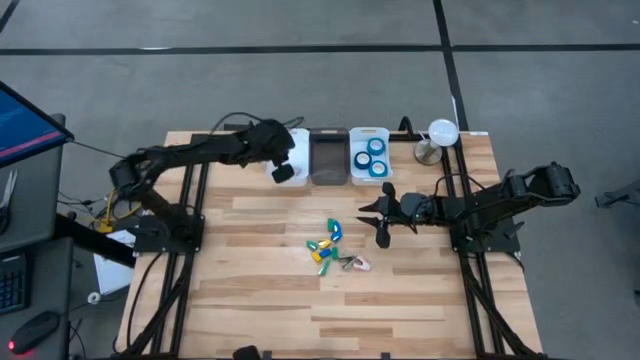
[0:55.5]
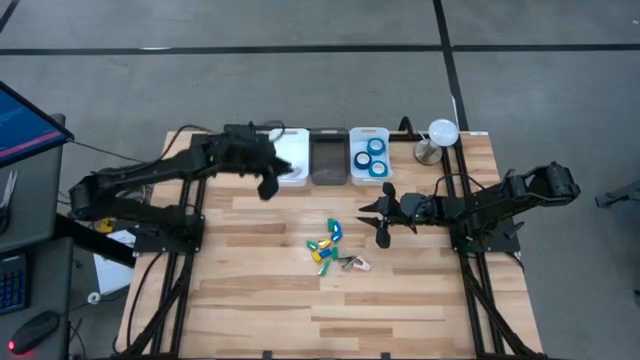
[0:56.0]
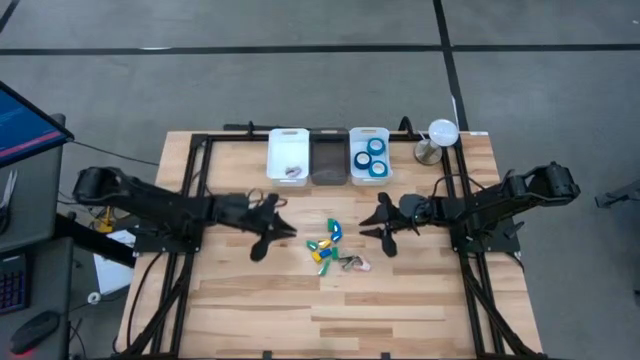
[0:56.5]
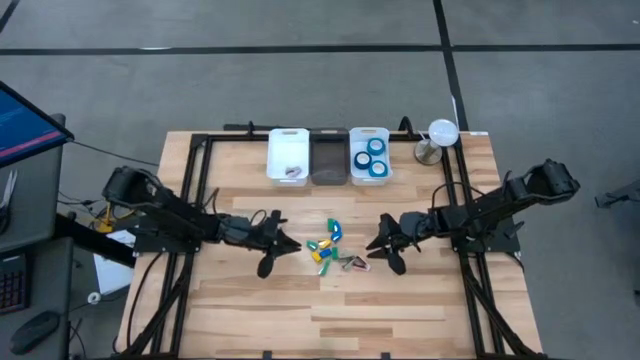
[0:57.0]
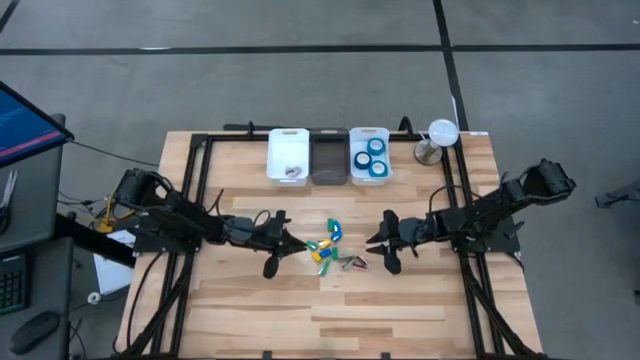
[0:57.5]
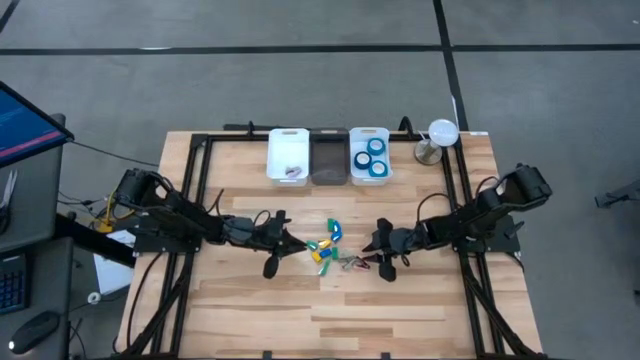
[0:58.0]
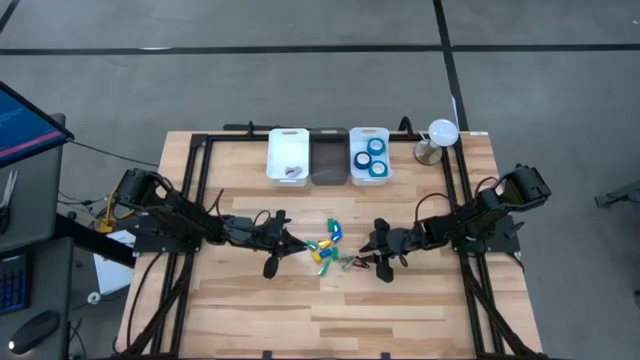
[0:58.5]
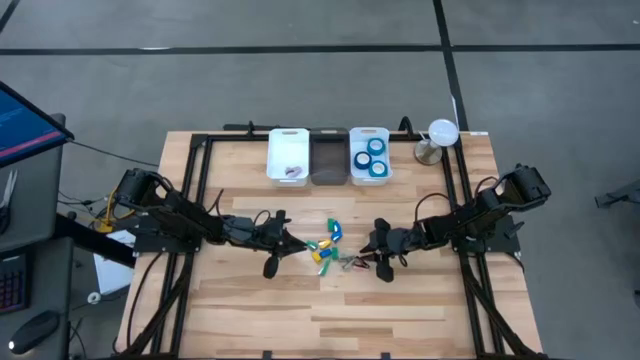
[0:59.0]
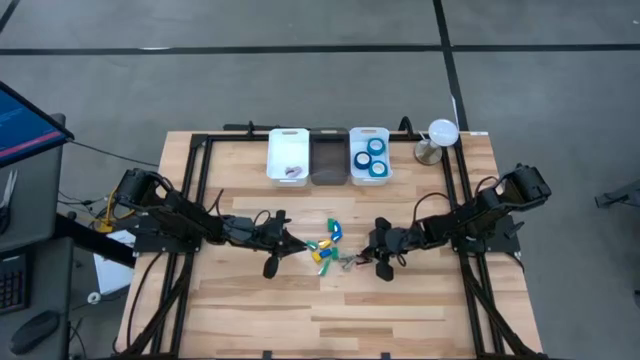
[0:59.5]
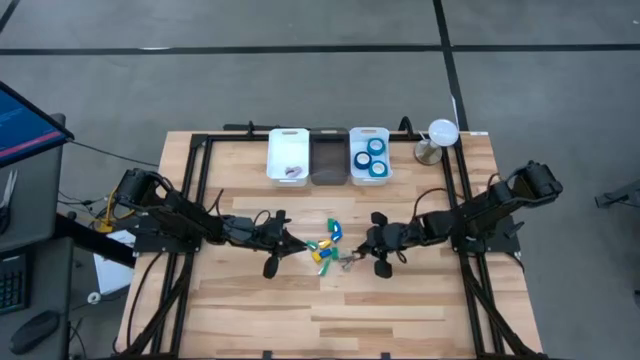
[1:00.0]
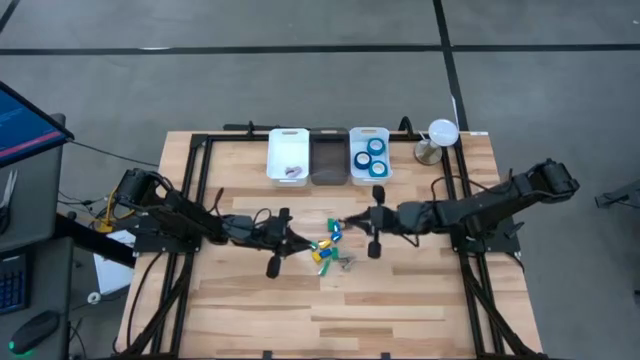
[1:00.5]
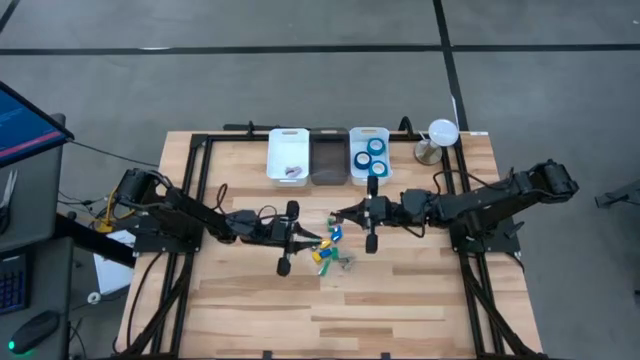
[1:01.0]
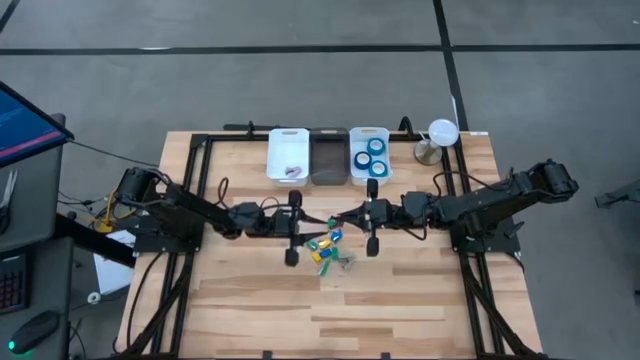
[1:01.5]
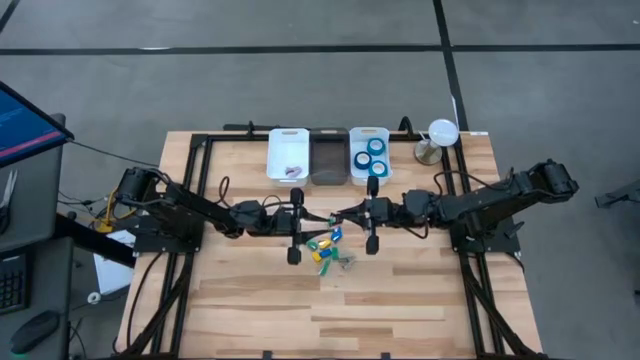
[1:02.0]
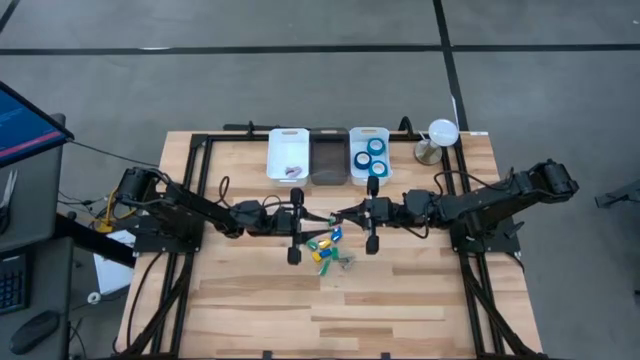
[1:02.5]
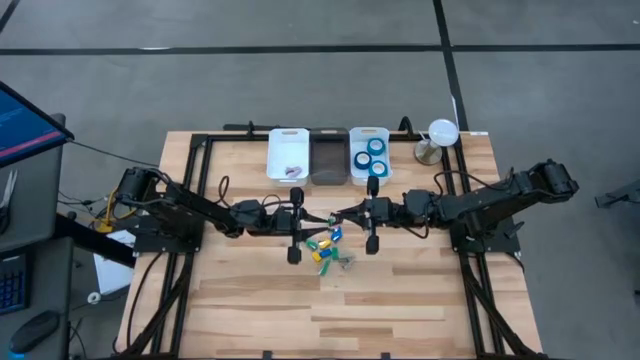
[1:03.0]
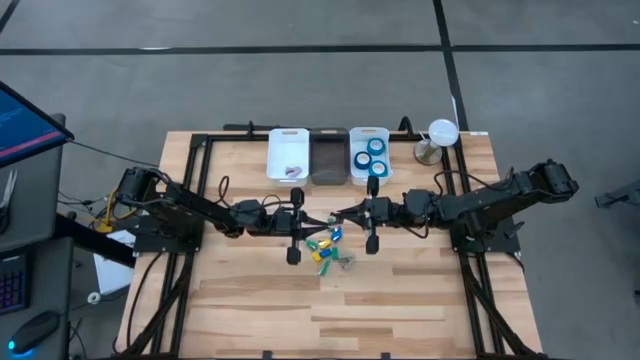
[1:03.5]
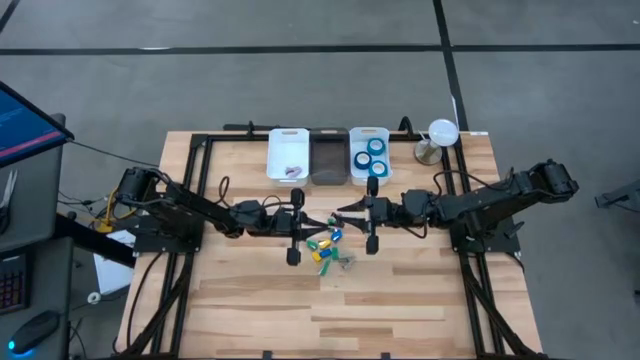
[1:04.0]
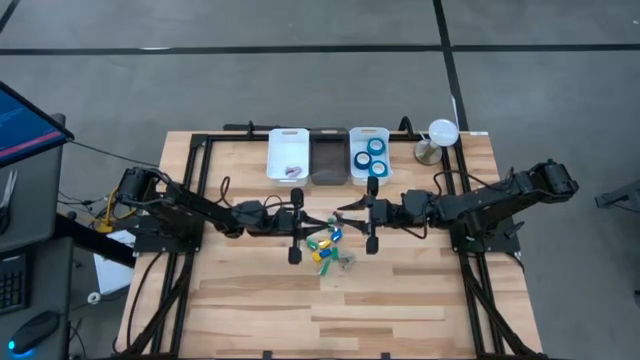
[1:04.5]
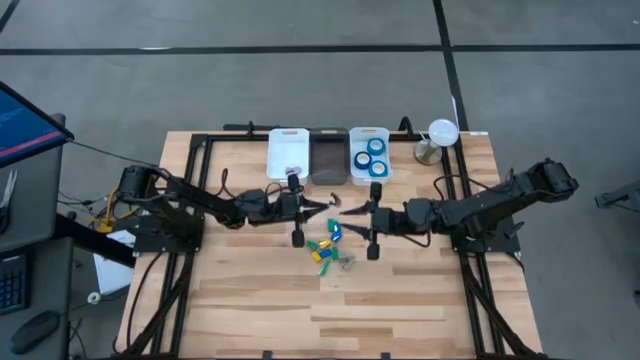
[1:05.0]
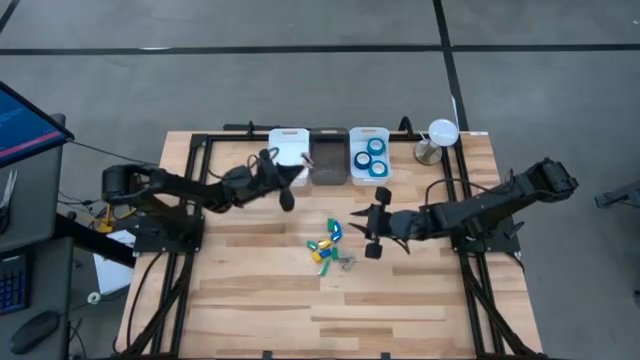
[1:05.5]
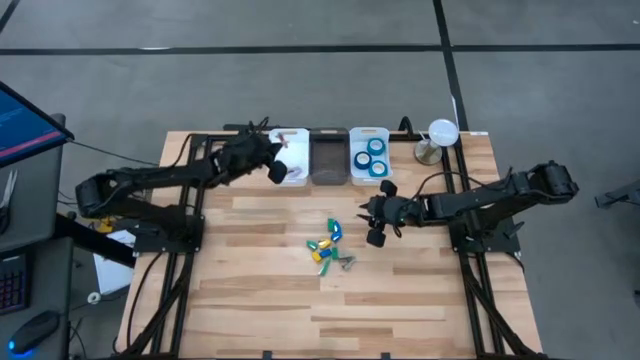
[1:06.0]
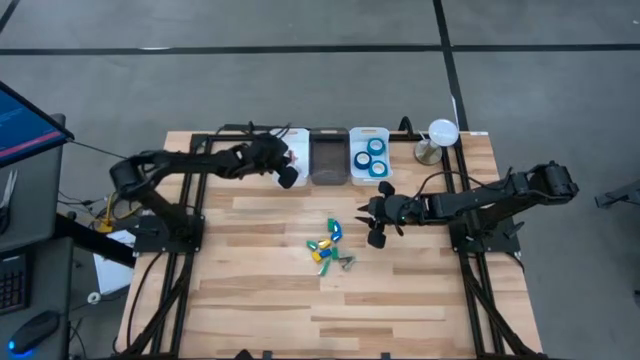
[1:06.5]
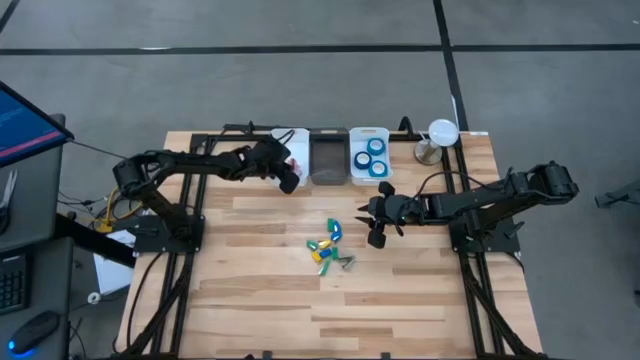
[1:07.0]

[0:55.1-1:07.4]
Task: Pick and place Stapler, Stapler remover, tape
Put the pink stapler remover into the left white bin

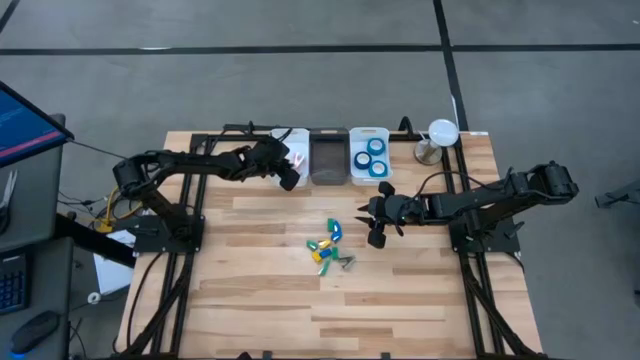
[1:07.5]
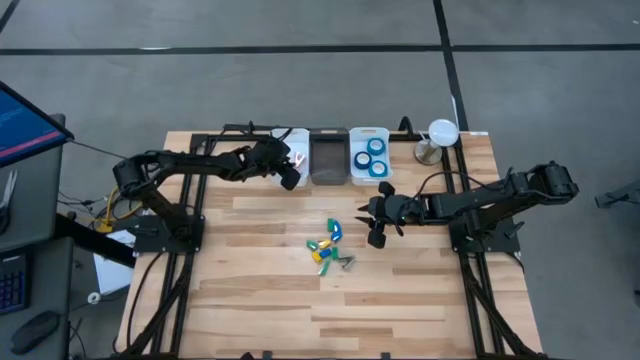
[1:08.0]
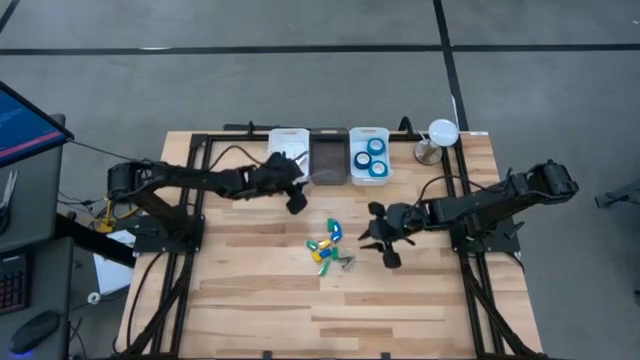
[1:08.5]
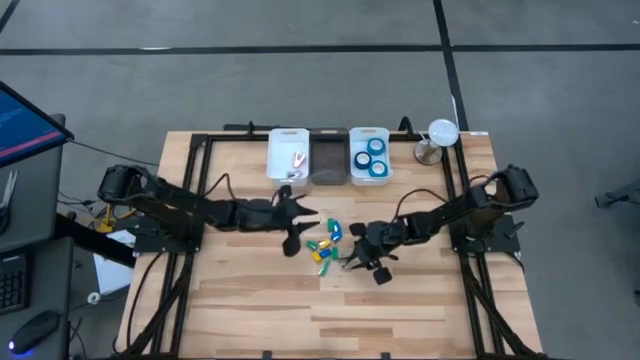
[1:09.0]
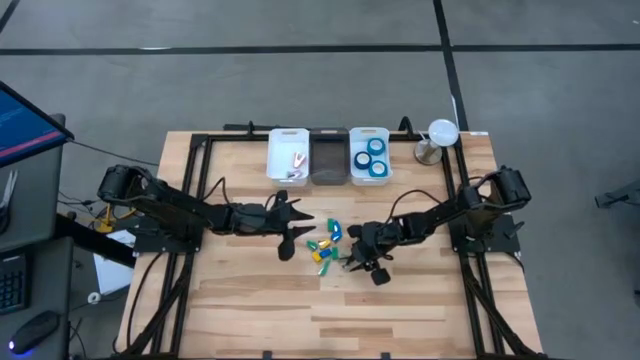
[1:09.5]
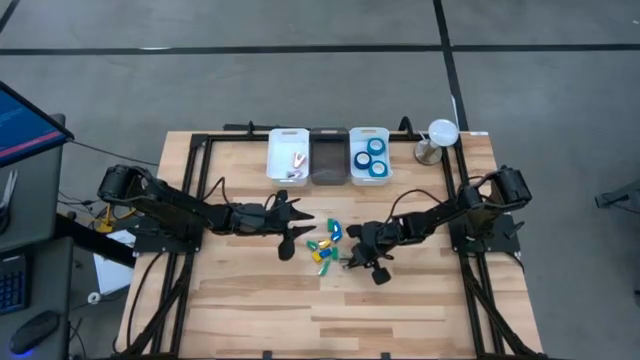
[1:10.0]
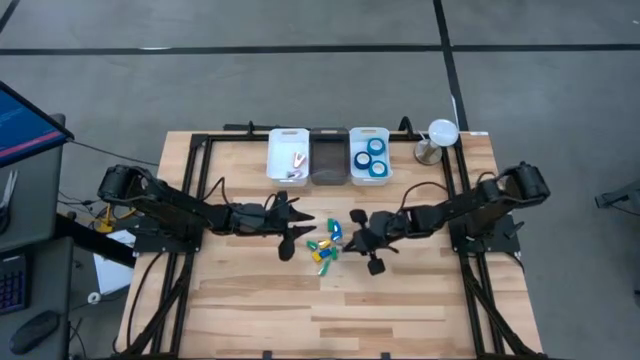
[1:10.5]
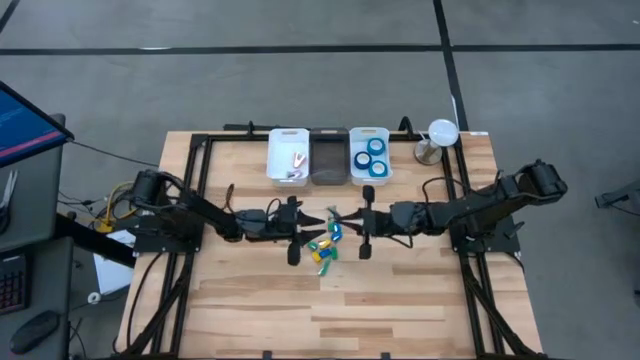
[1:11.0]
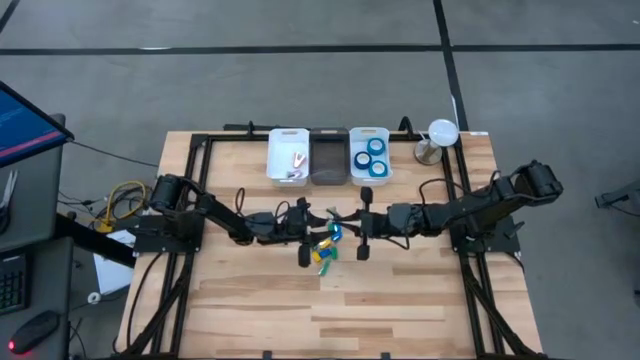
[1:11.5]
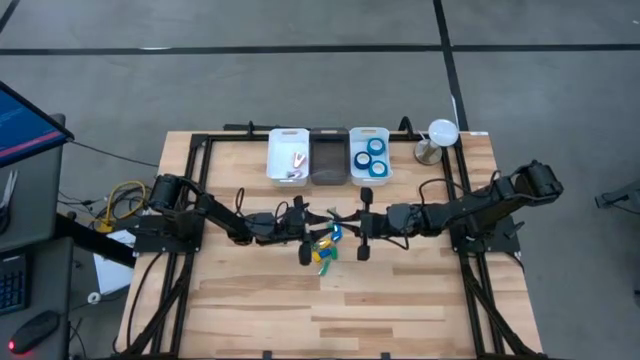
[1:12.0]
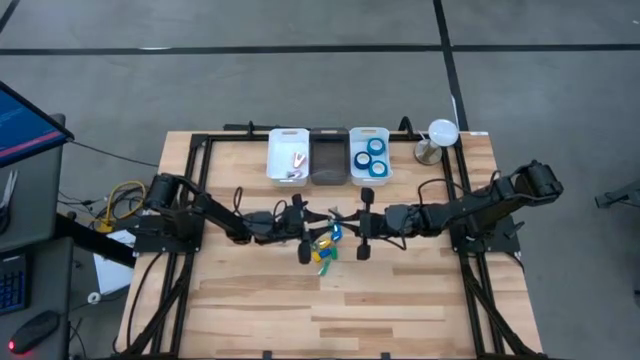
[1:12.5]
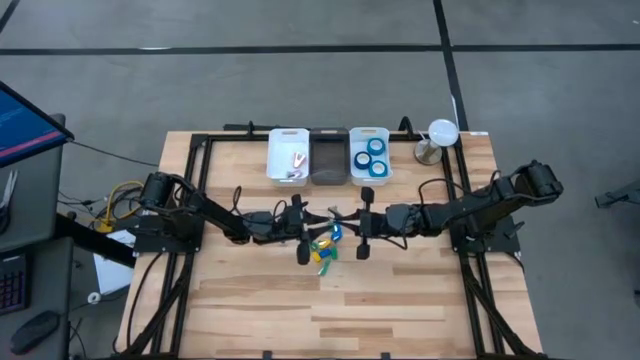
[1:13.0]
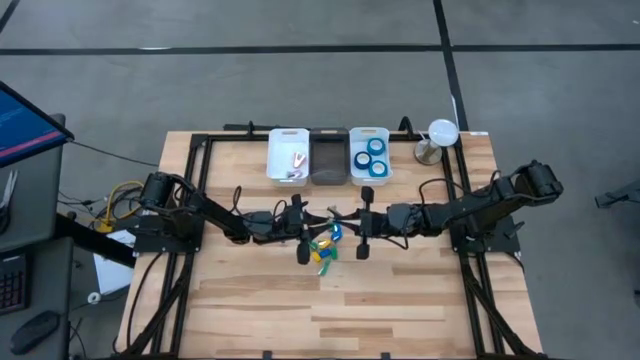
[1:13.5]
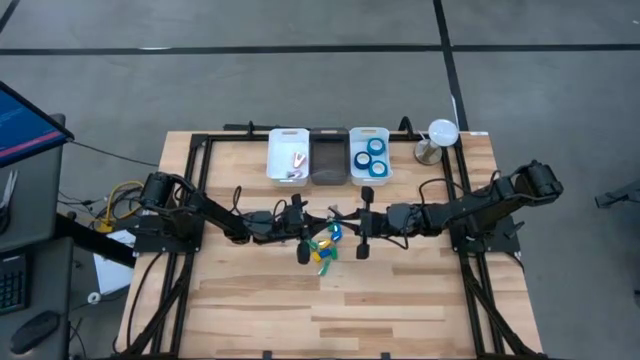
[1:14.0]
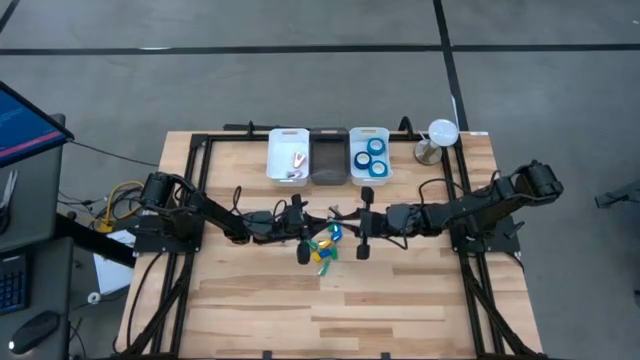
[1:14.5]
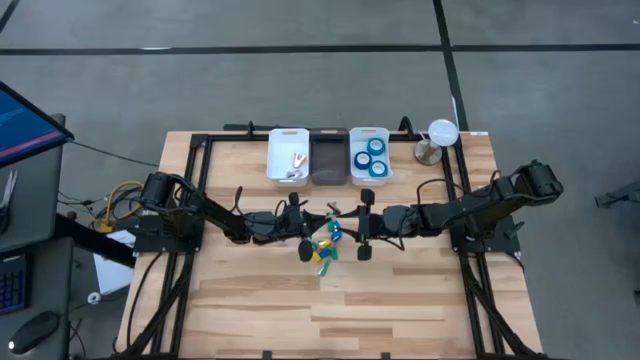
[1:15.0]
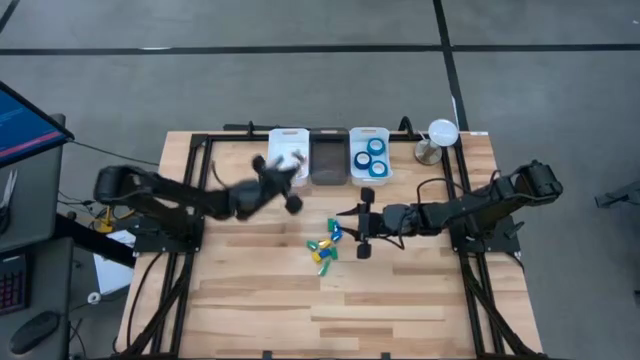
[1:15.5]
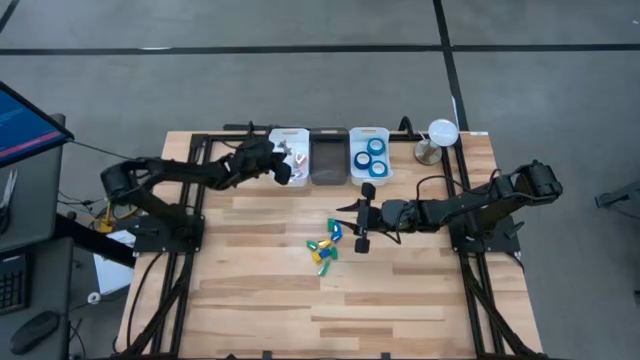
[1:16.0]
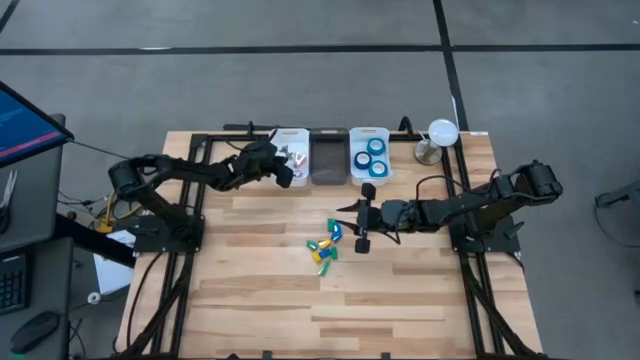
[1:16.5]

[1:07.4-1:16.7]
Put the gray stapler remover into the left white bin
